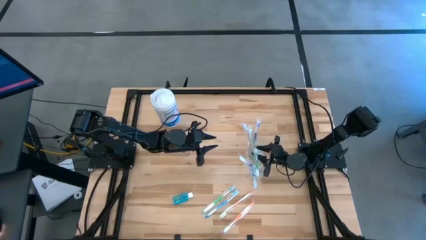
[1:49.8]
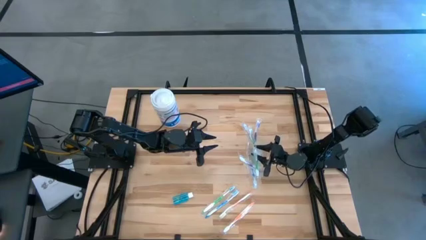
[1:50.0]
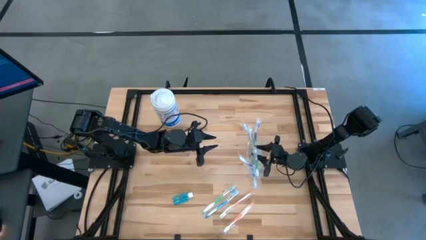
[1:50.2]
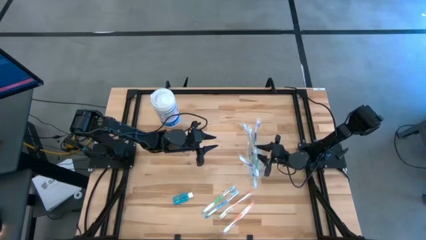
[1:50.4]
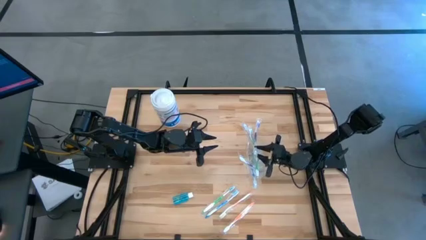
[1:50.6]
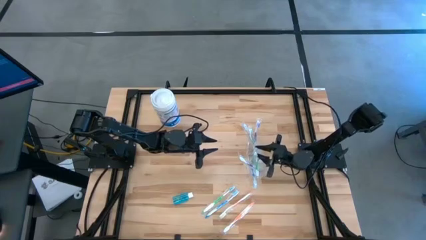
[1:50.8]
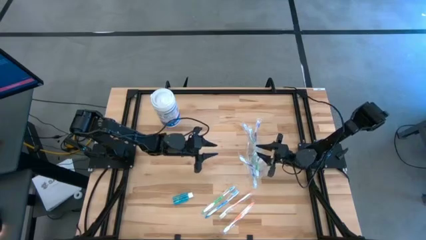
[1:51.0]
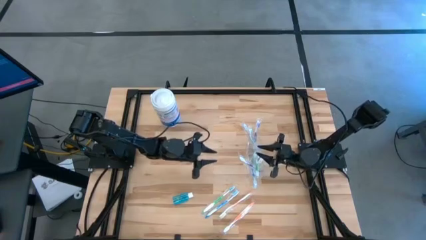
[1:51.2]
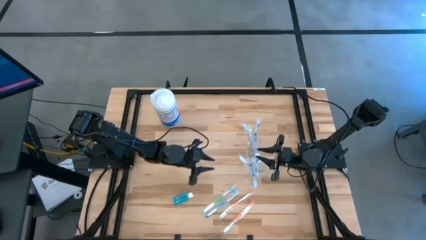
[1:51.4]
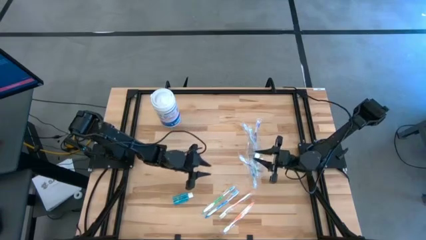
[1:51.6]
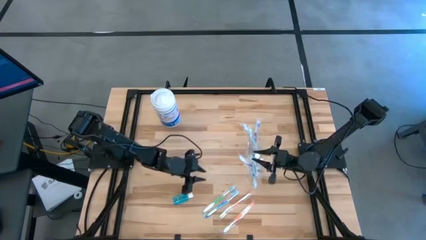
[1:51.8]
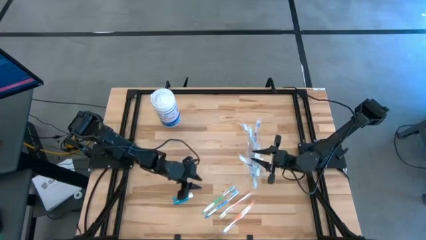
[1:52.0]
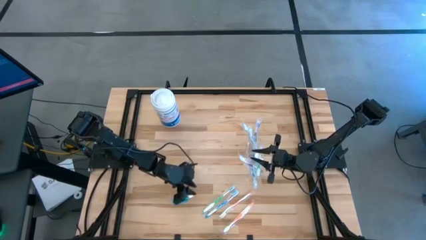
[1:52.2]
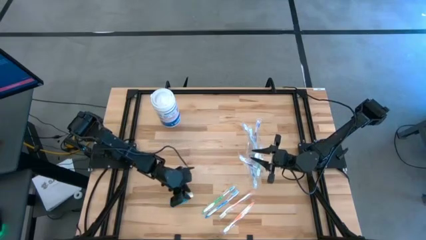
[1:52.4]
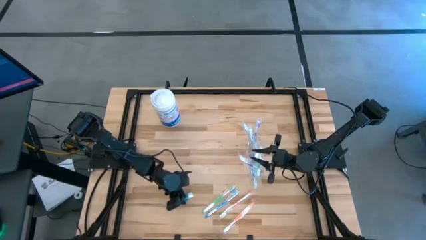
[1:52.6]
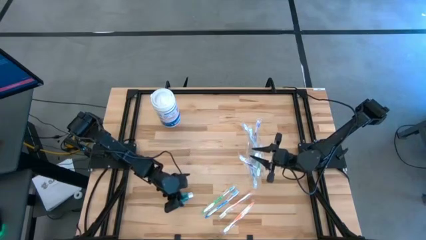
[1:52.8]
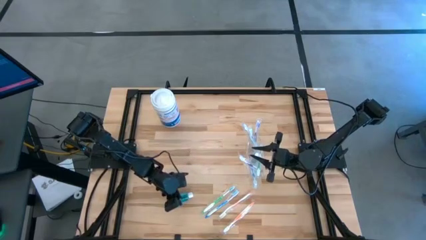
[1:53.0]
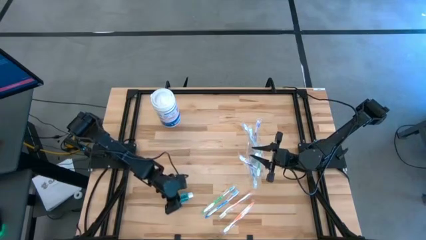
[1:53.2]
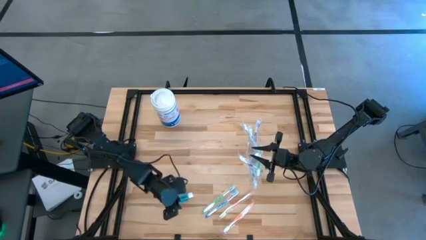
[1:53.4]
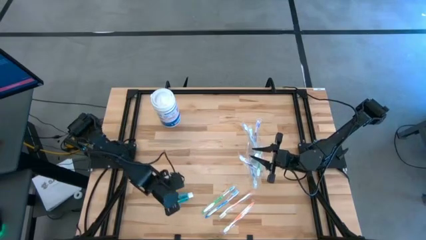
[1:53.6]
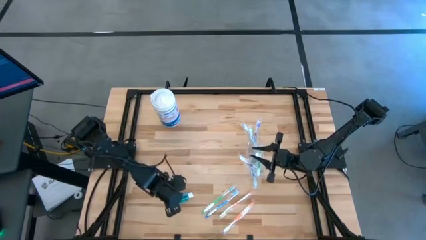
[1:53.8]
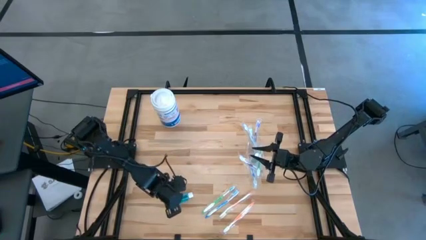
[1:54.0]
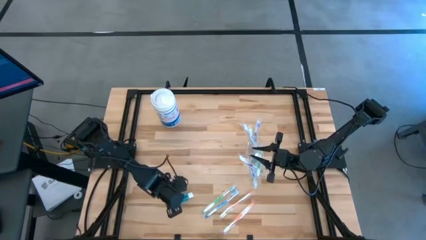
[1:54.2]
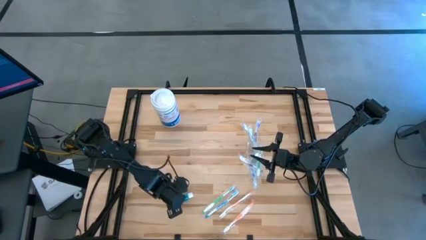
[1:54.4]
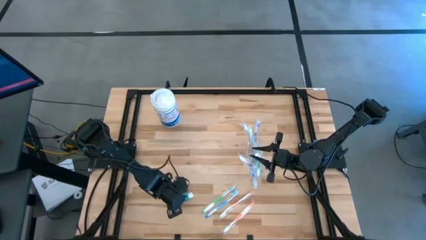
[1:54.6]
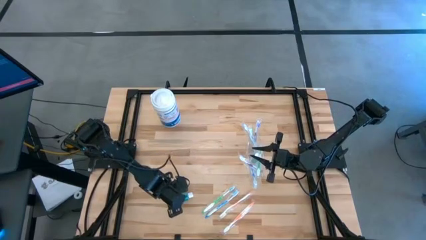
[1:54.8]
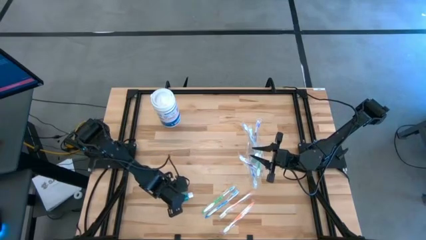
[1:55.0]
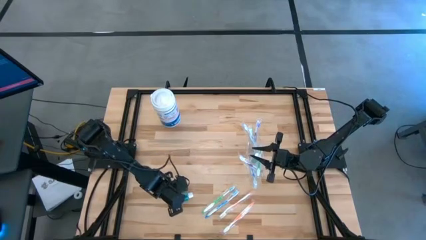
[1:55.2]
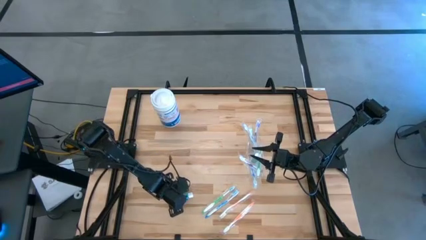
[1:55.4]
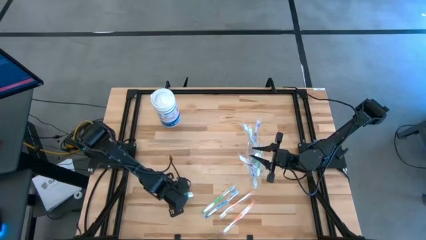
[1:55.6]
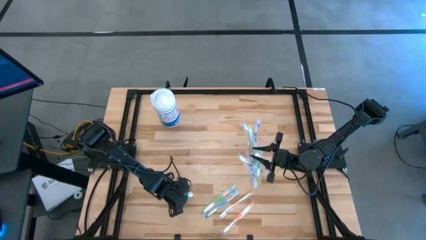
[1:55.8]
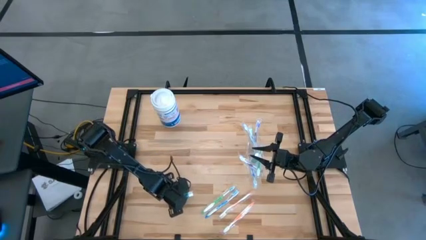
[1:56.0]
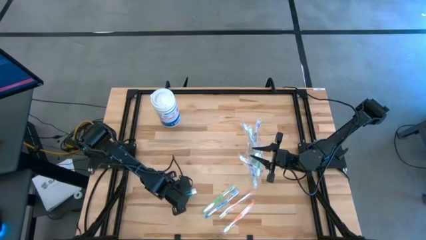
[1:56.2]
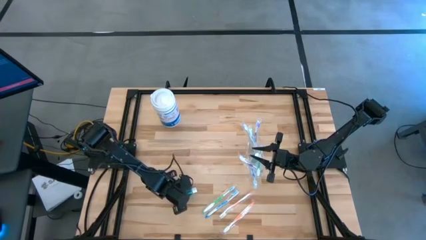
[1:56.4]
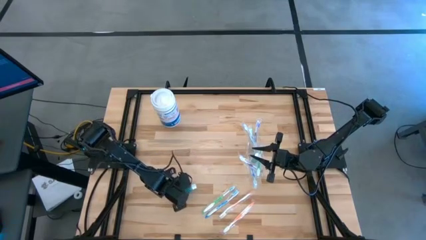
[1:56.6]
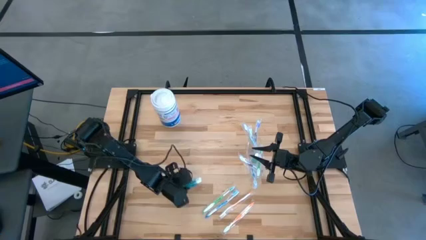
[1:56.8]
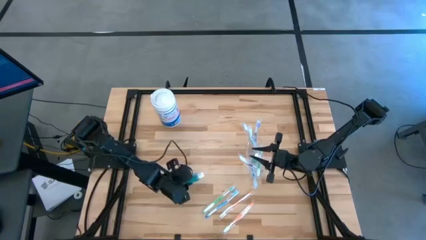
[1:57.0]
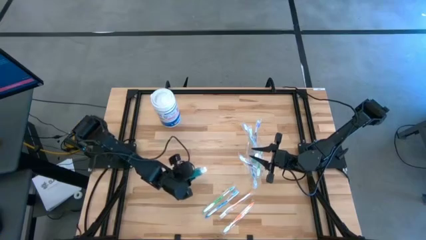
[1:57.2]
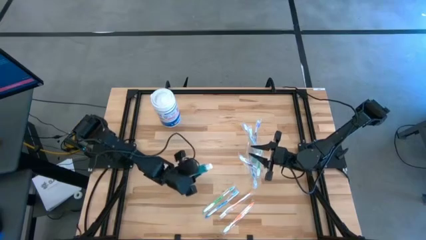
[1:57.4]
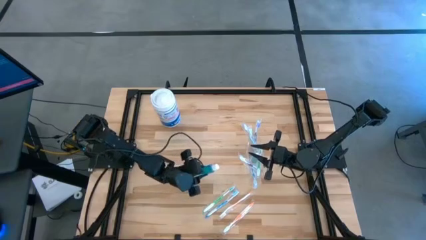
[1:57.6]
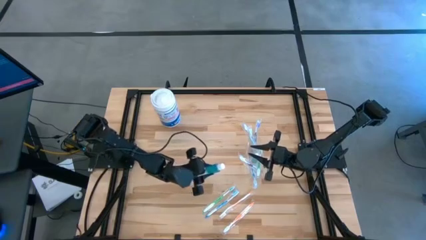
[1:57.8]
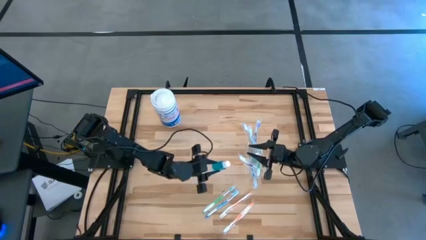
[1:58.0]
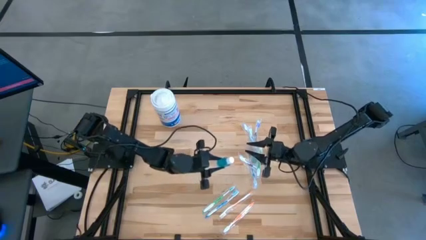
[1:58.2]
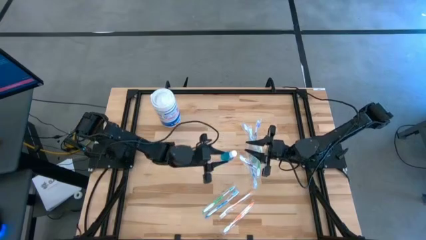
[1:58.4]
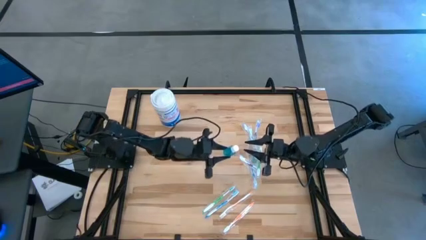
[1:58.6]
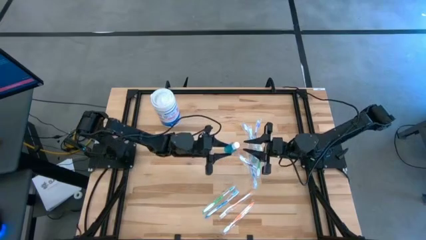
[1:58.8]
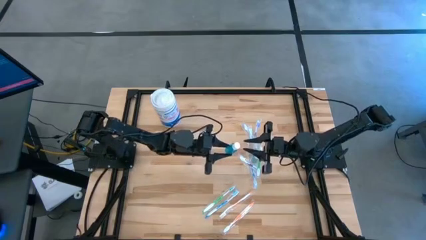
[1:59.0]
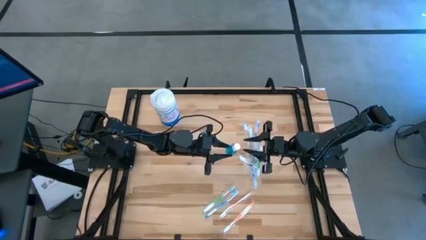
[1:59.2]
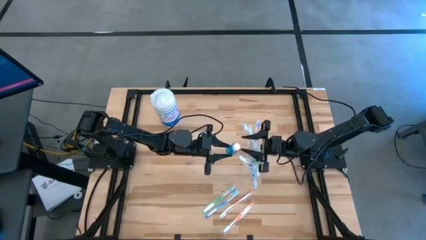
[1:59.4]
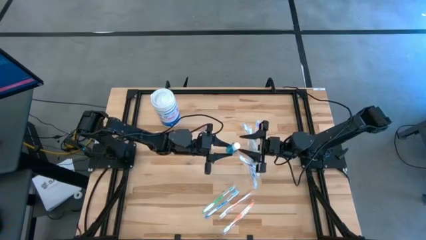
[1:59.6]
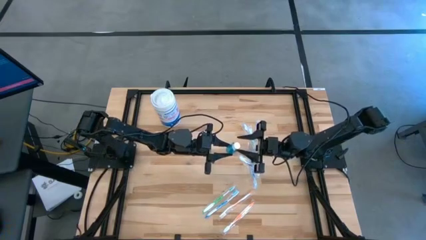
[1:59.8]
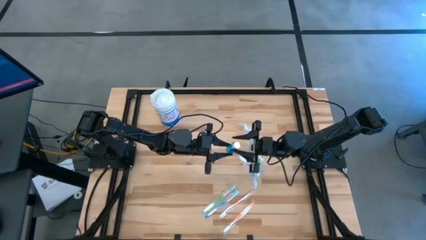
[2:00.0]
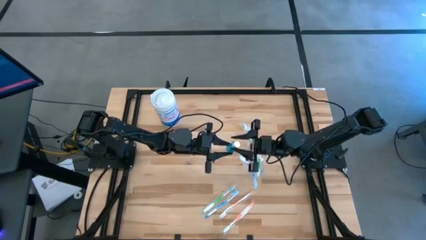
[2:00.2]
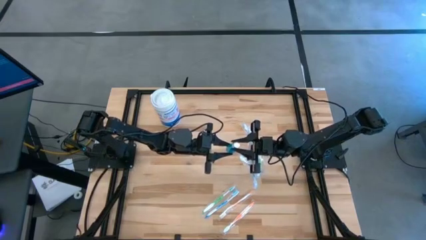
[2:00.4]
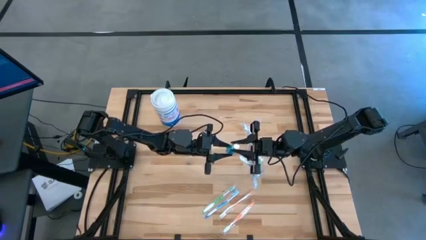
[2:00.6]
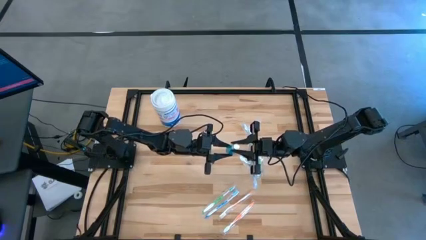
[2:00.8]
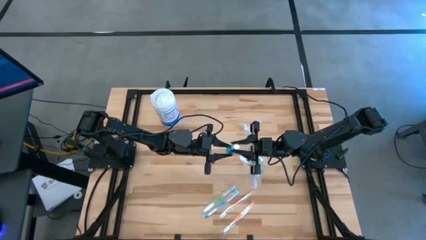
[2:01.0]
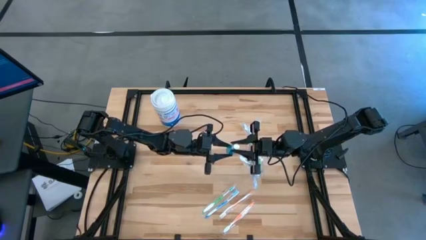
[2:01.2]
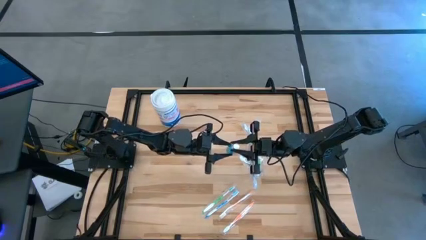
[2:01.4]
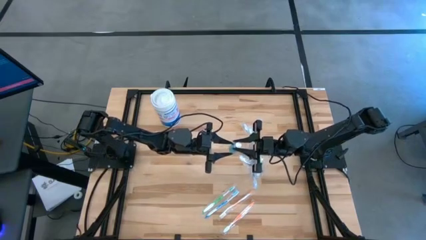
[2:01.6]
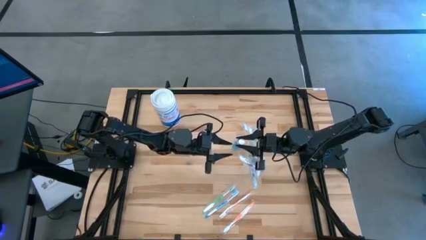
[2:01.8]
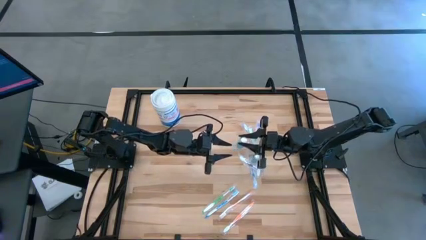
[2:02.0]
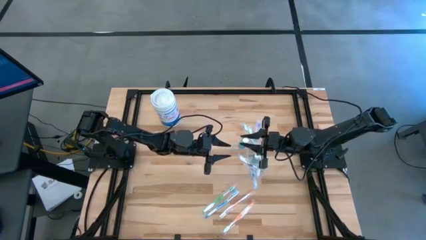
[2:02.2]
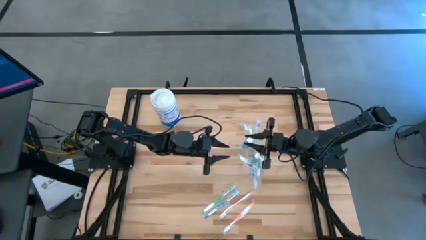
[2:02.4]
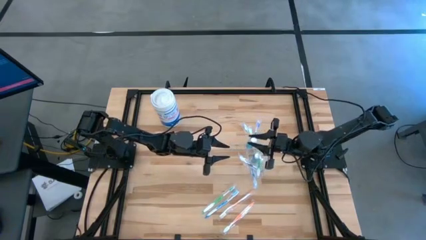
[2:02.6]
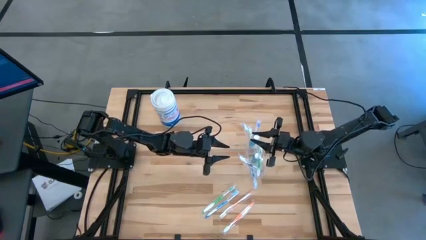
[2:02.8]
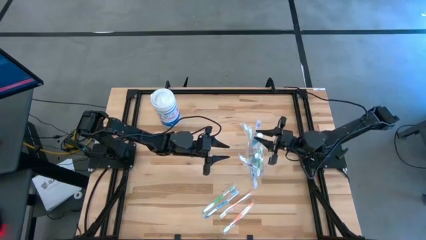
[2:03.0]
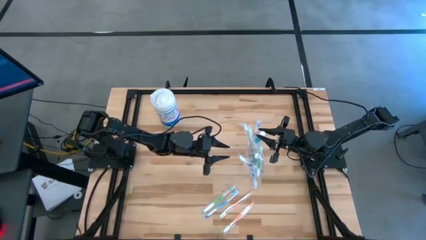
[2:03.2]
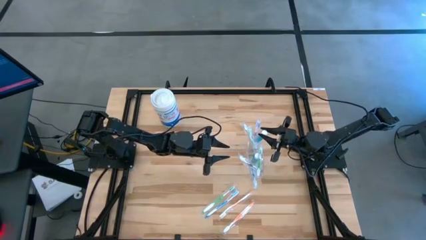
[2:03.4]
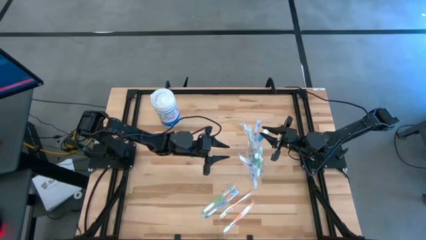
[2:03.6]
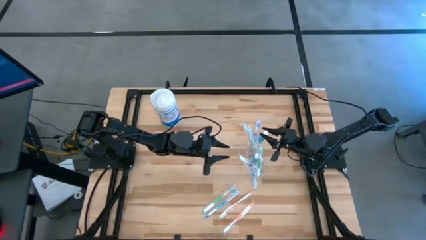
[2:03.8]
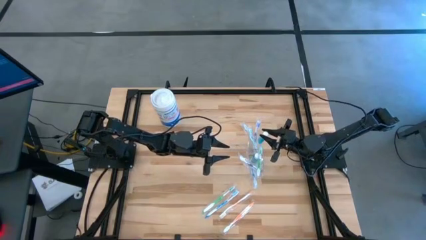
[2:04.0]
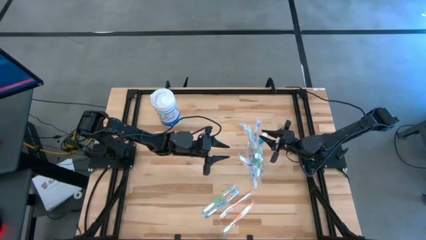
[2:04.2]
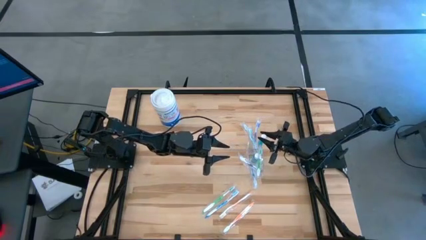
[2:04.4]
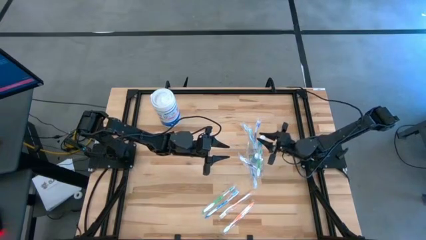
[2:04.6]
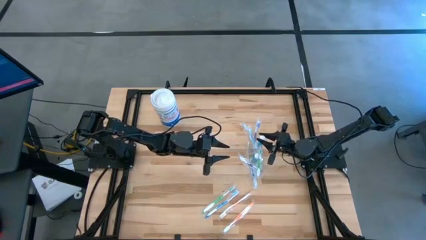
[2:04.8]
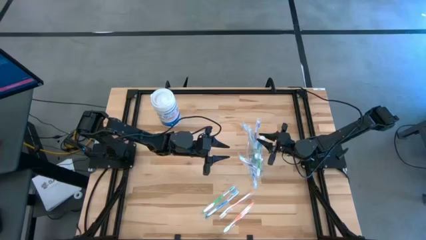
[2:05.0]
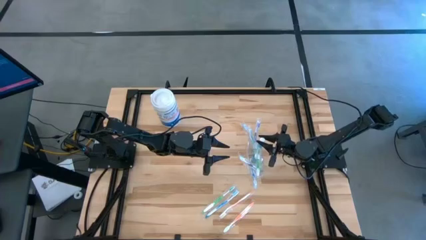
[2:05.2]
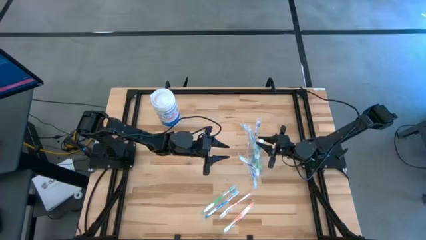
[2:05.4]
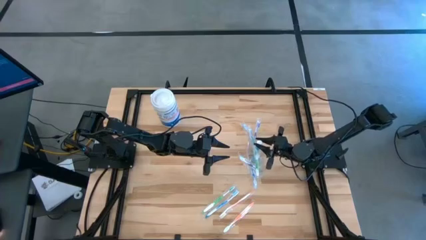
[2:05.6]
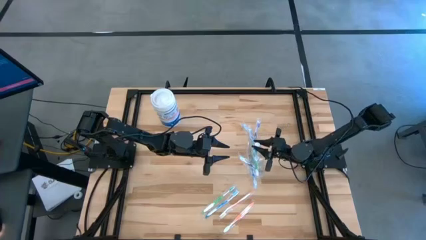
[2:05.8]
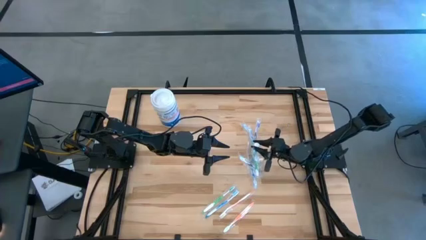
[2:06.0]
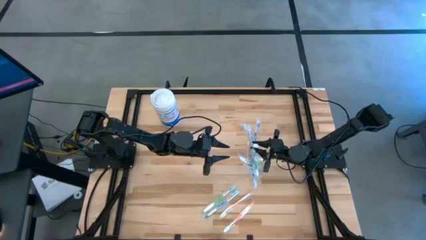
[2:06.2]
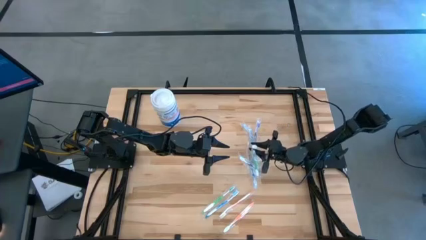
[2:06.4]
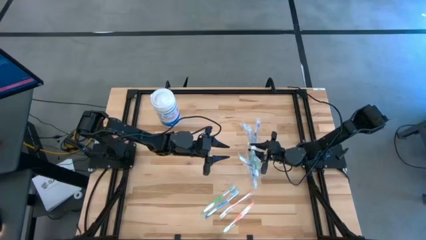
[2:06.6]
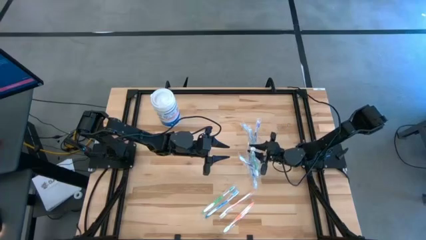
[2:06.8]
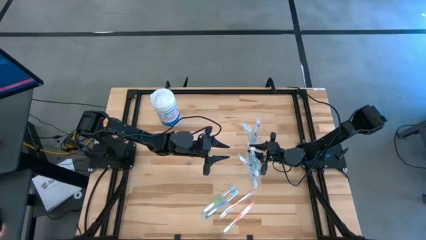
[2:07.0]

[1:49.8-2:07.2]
Task: Pick & Place toothbrushing station
Put the blue mouthwash into the transparent organizer
